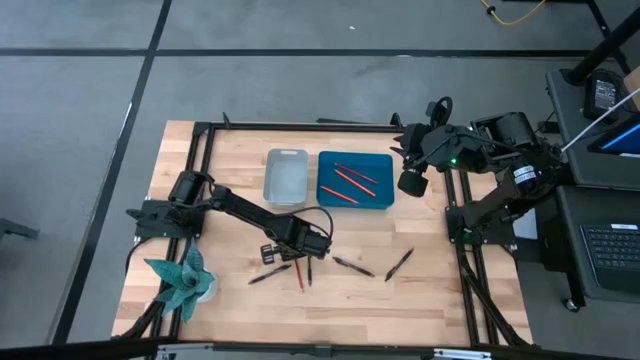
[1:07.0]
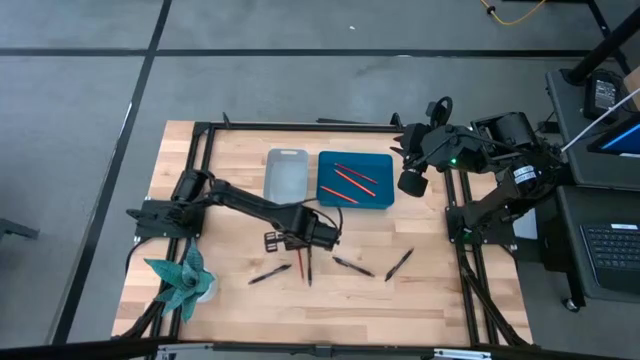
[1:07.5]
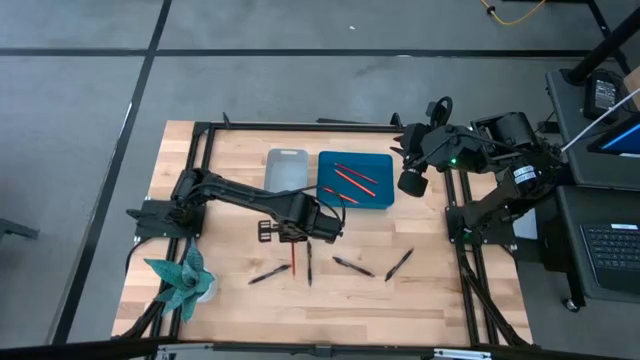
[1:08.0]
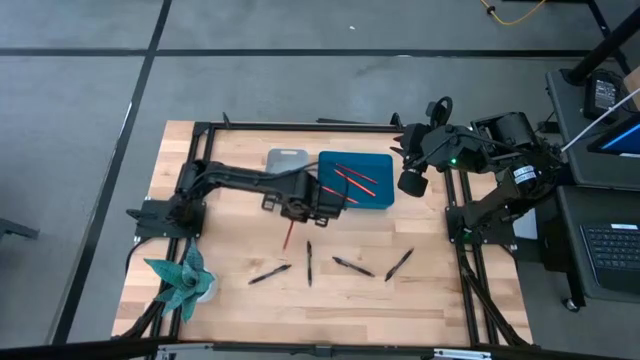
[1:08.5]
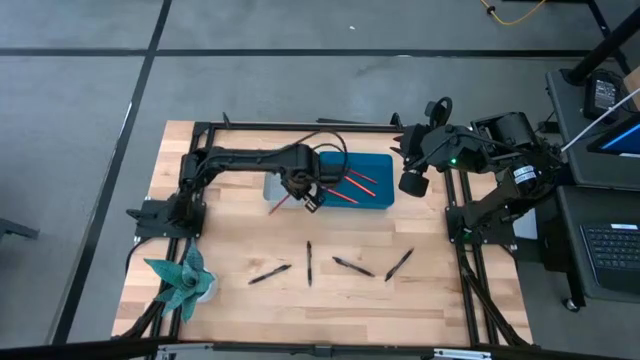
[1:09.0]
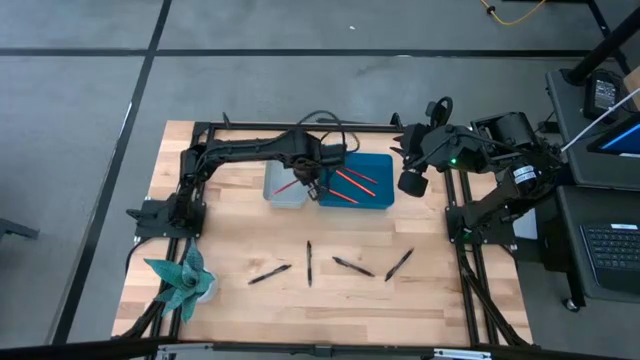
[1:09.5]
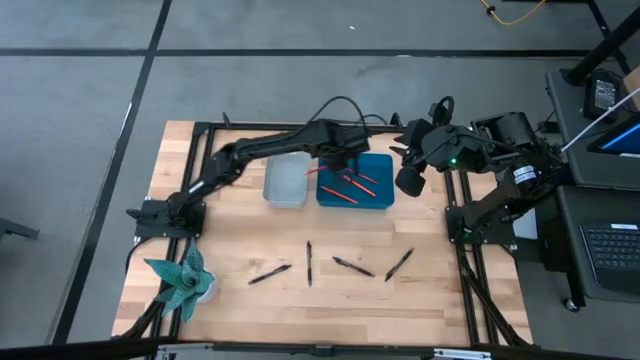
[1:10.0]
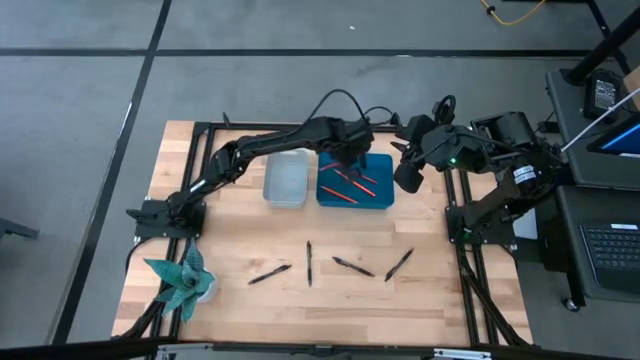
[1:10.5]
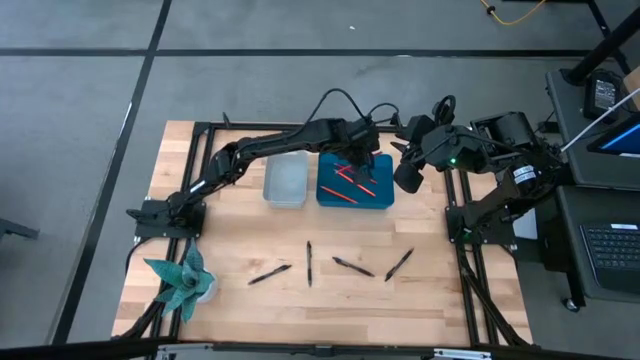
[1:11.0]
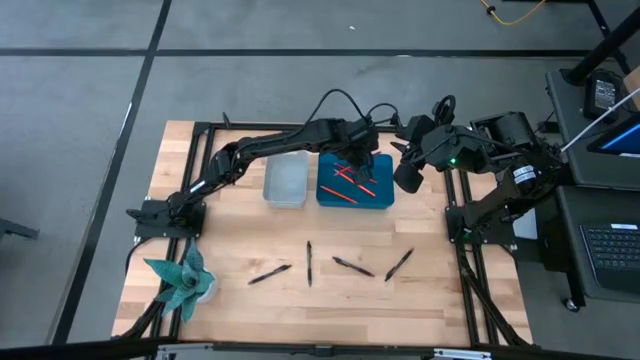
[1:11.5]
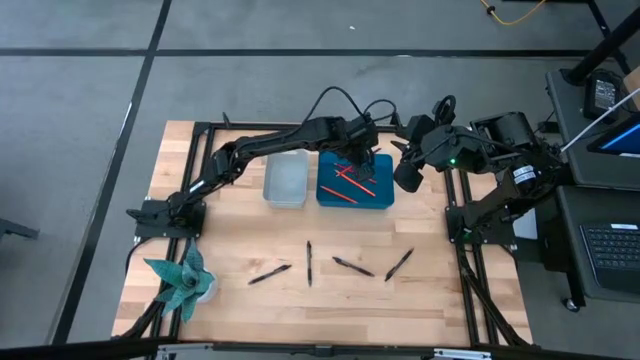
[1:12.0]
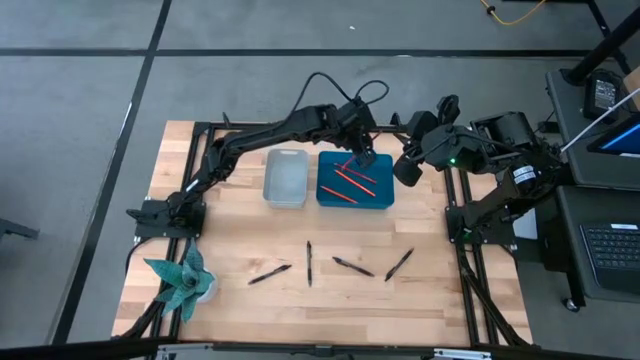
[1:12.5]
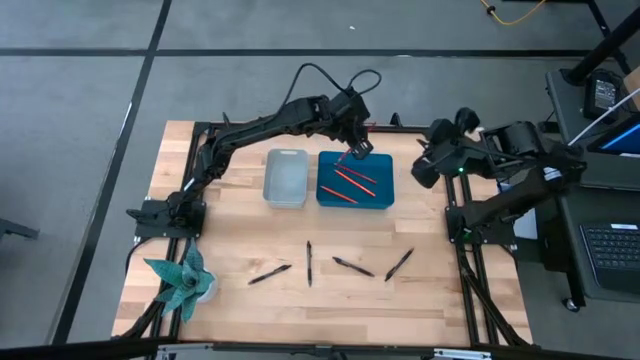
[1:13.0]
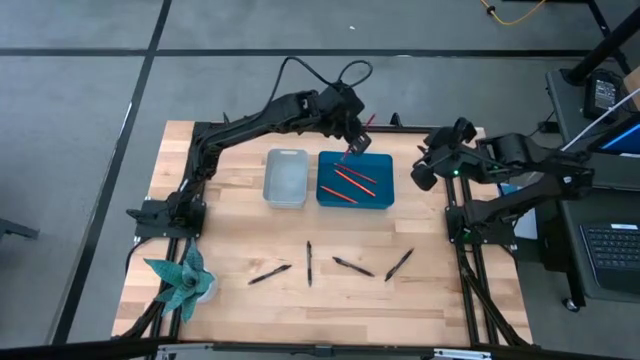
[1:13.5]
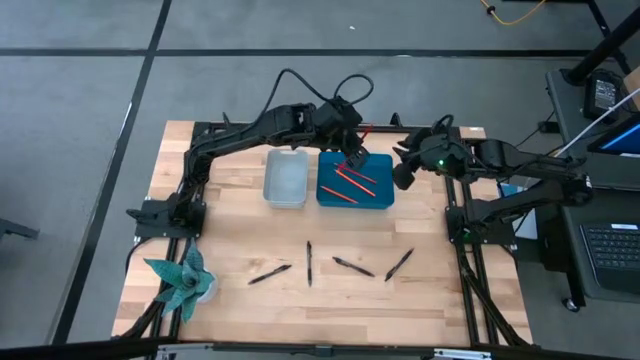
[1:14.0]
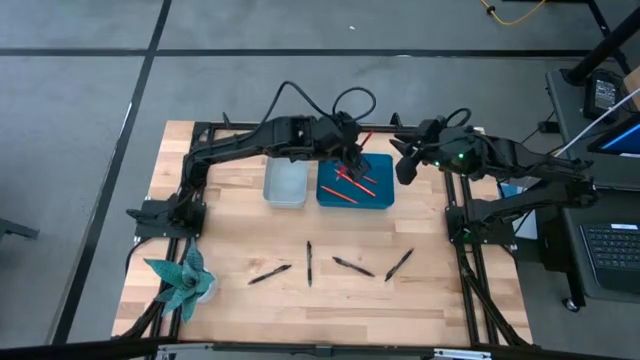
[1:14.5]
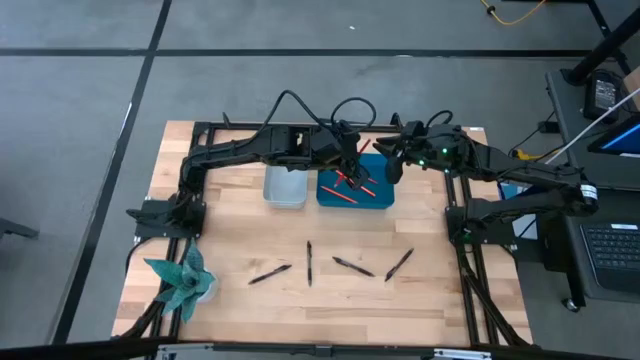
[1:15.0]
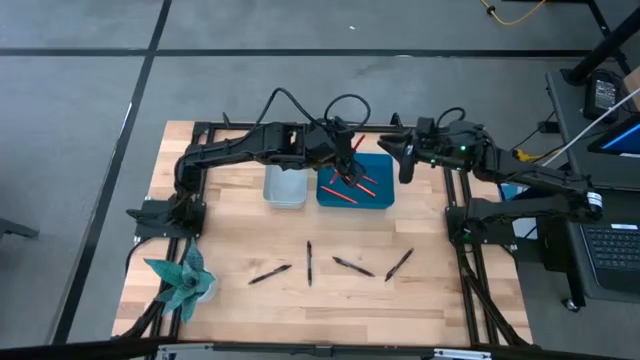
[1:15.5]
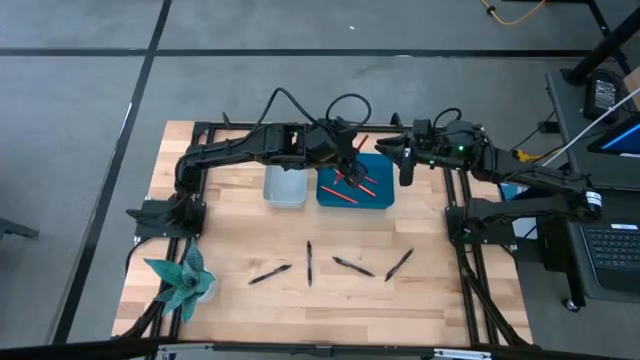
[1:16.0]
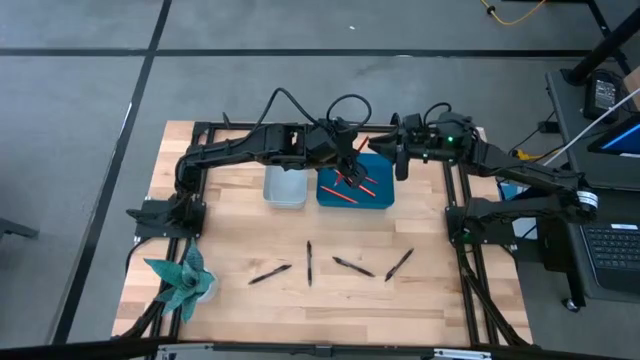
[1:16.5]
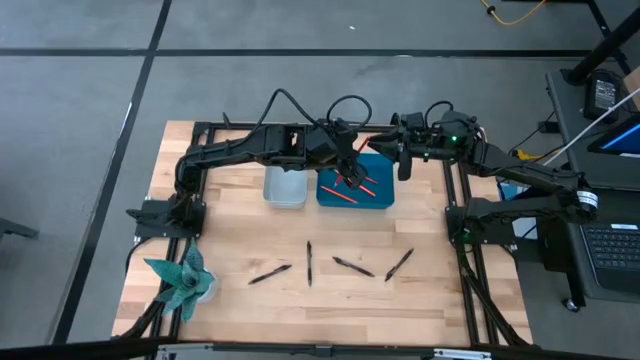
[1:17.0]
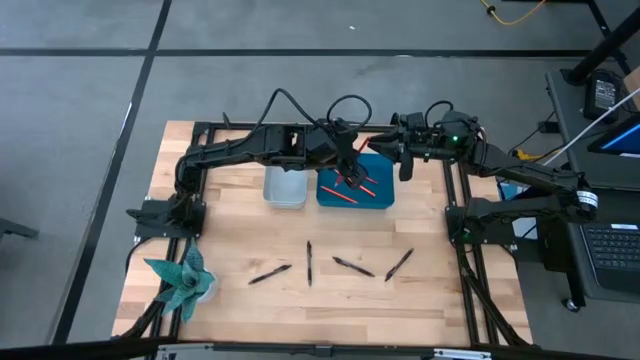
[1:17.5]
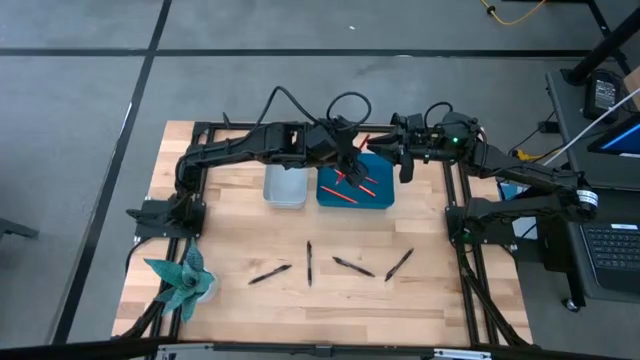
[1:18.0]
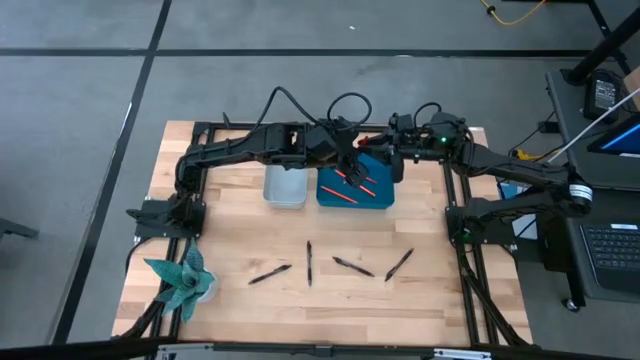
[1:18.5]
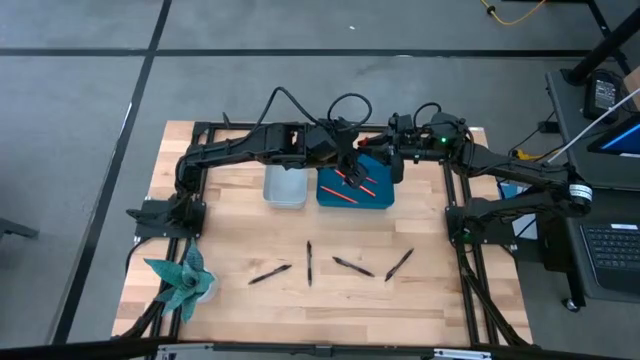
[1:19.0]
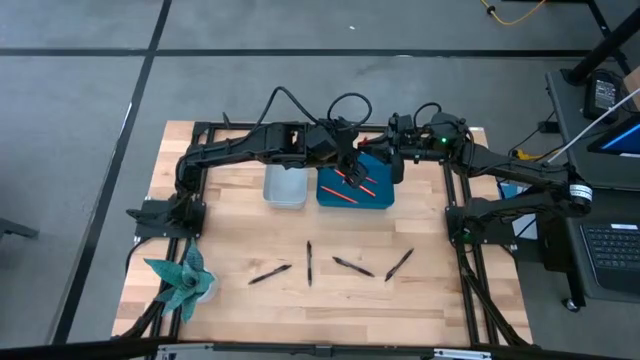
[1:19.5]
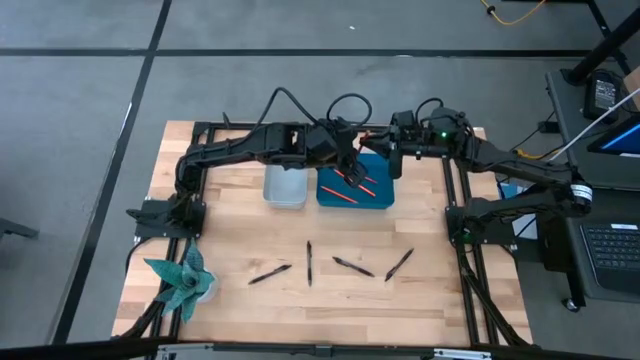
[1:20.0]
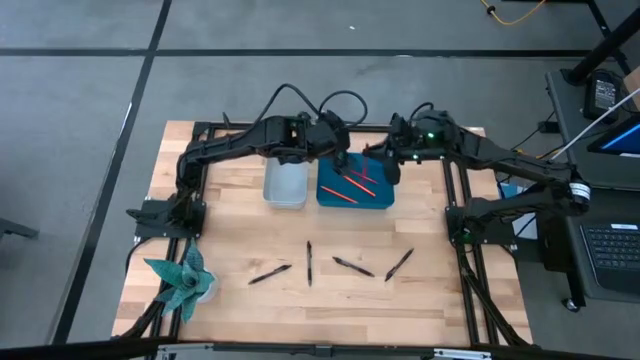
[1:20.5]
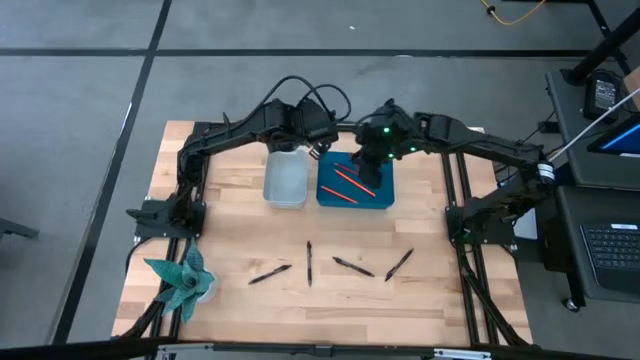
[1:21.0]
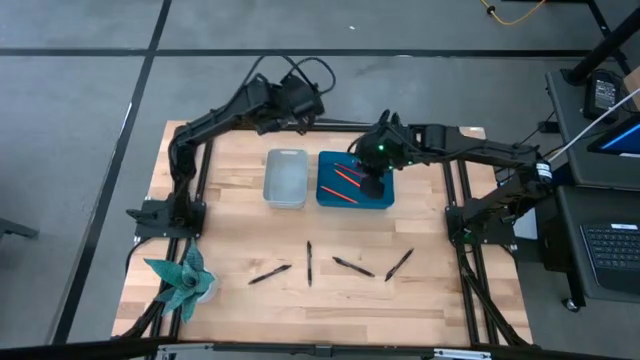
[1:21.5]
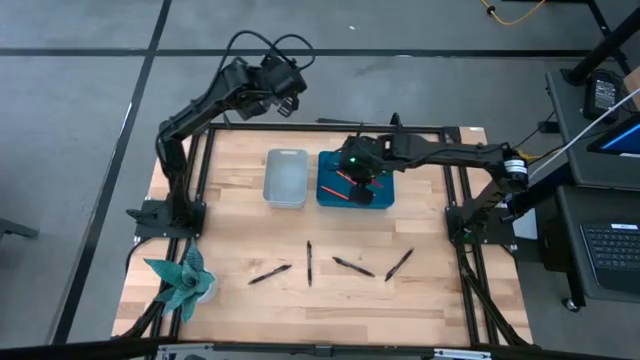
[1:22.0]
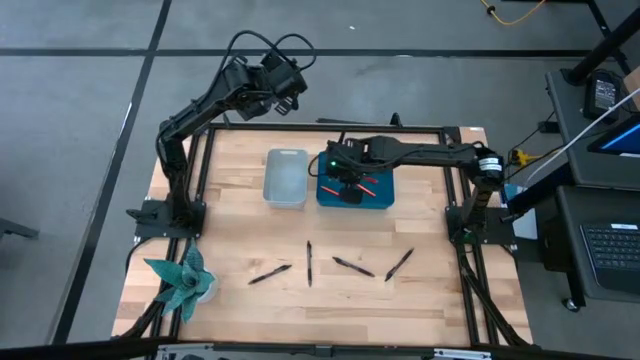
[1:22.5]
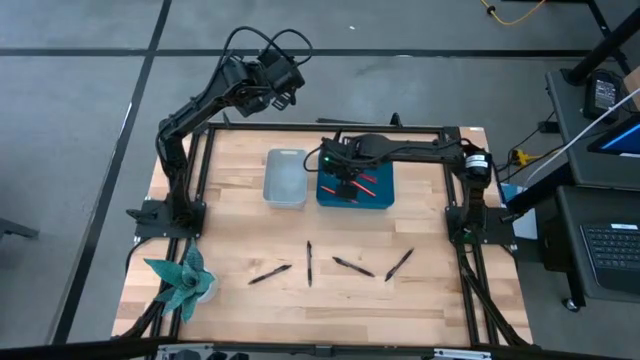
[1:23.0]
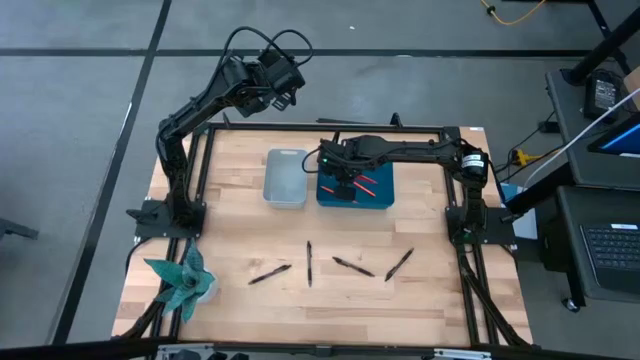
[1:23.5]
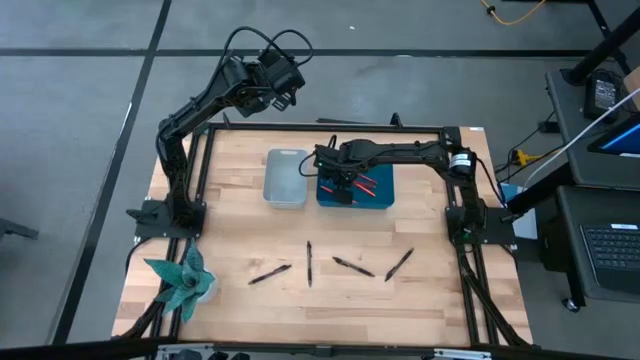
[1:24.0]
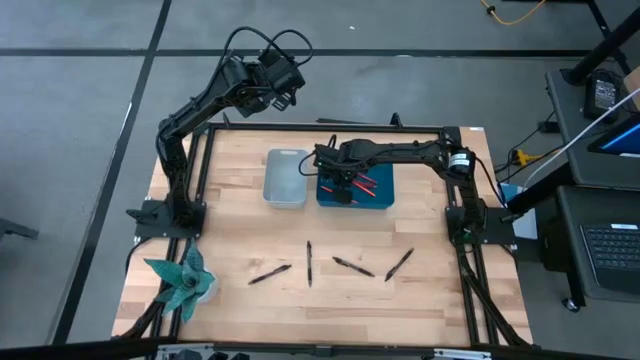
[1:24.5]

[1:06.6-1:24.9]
Task: Sort pens & pencils
Put the red pencil into the blue bin

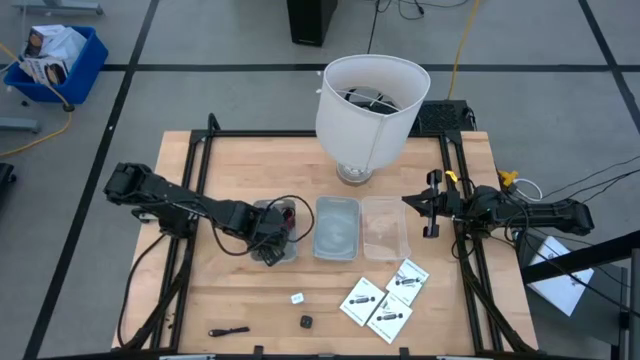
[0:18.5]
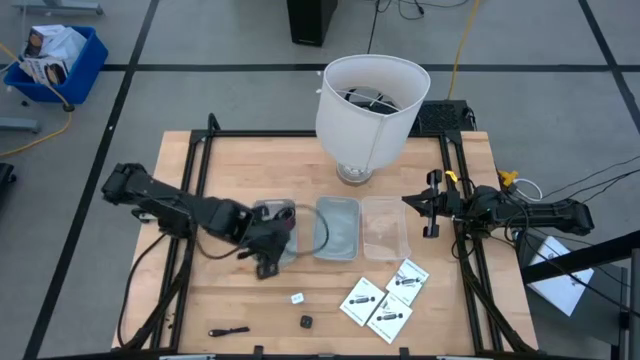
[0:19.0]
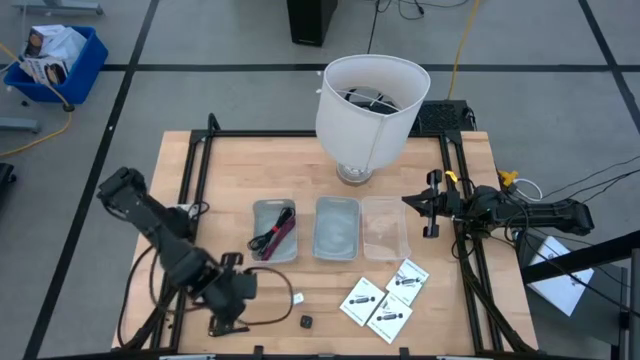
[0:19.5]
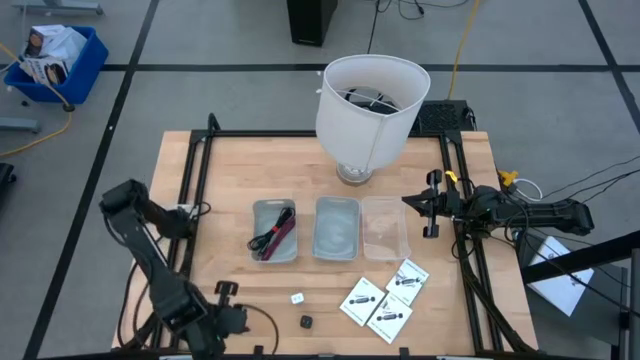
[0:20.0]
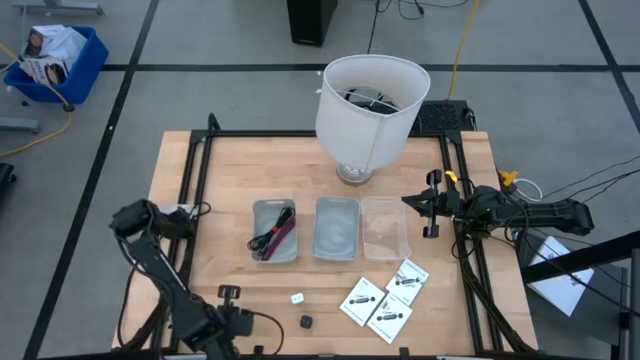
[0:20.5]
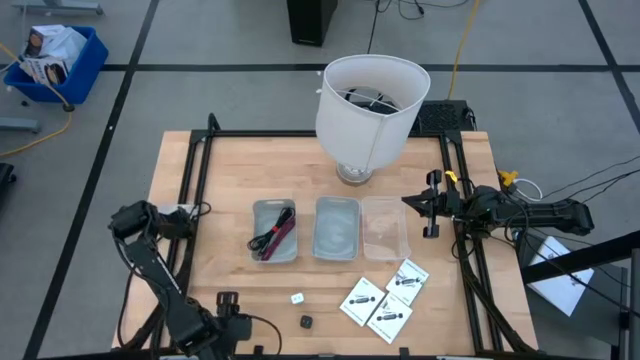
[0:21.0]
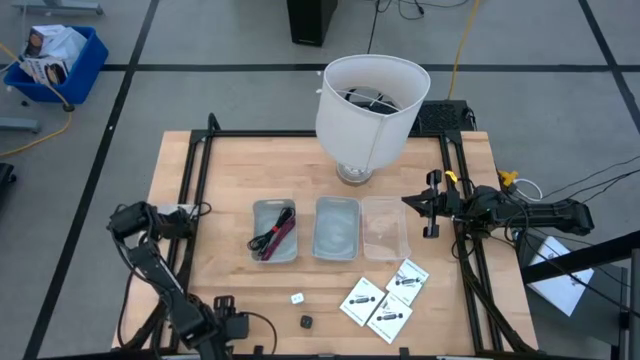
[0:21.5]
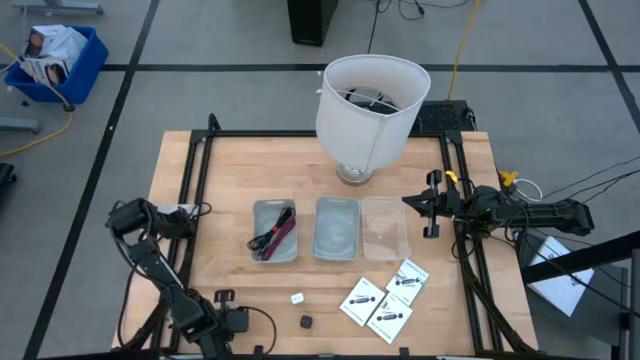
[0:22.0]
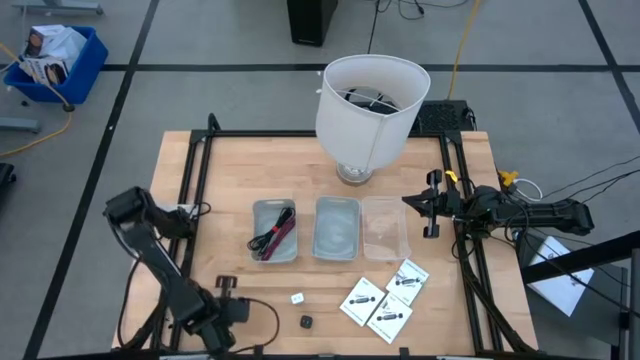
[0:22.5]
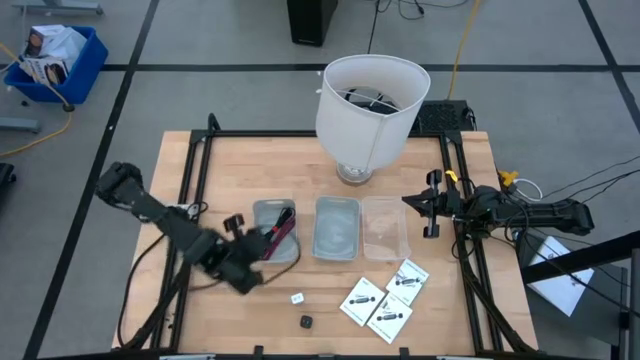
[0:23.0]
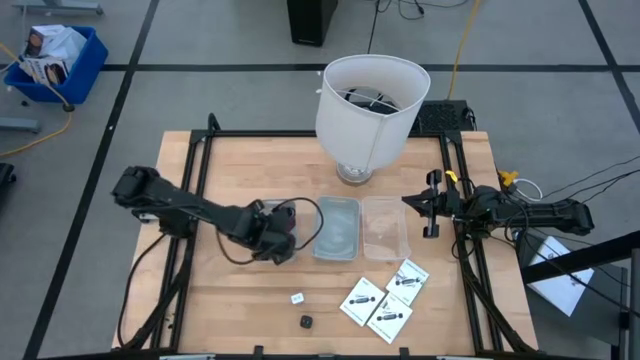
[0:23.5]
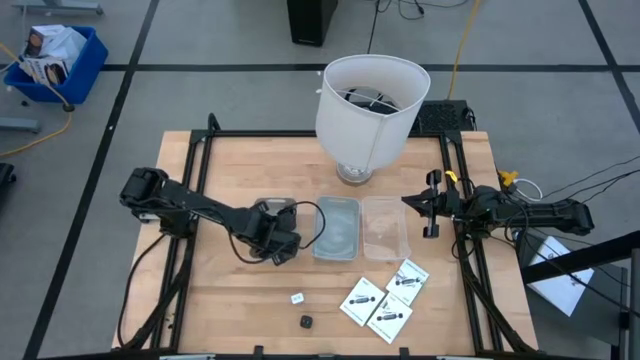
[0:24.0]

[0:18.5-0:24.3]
Task: Pick and place items into bin
Put the black charger cable into the left gray bin
